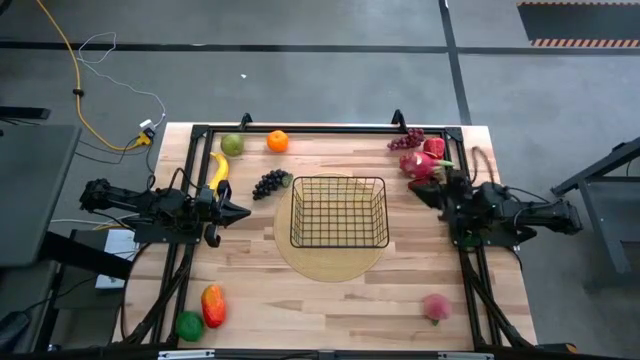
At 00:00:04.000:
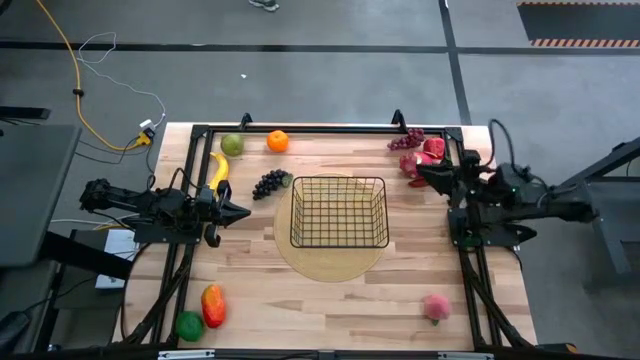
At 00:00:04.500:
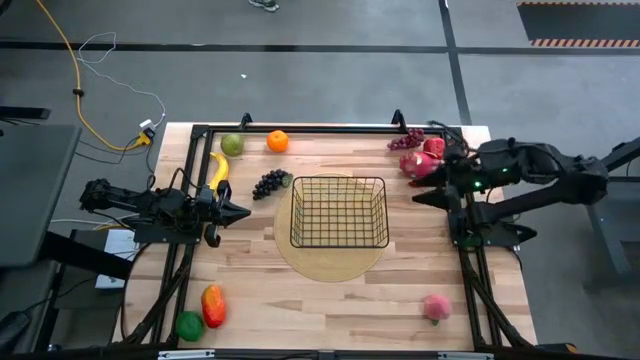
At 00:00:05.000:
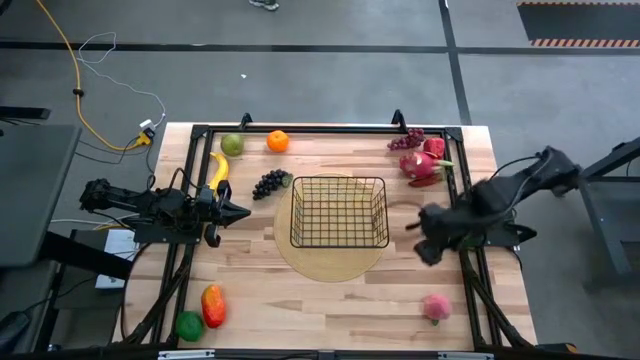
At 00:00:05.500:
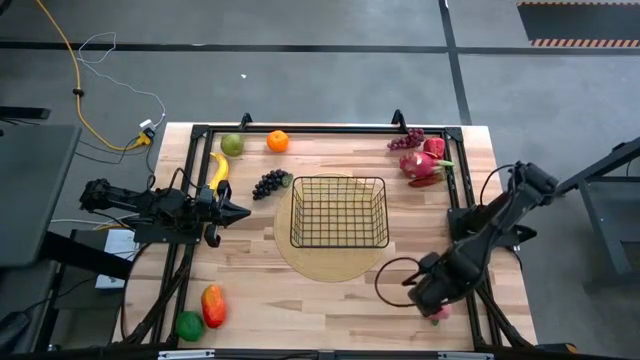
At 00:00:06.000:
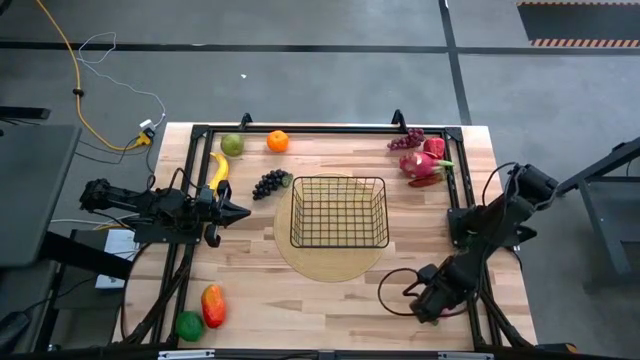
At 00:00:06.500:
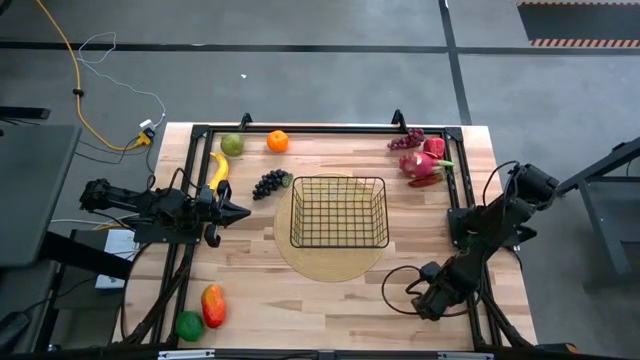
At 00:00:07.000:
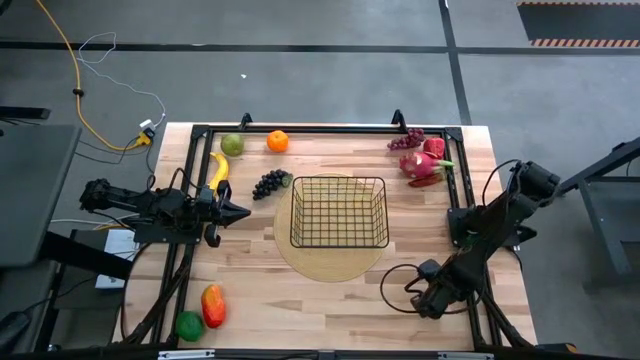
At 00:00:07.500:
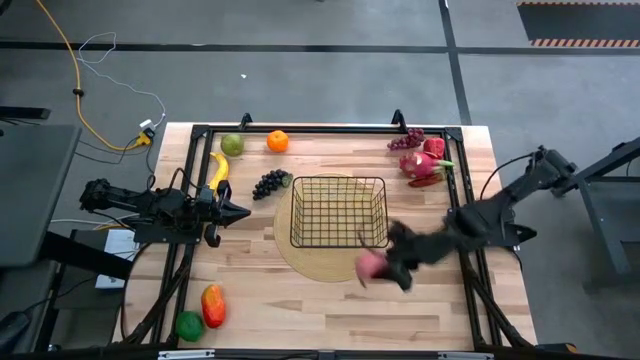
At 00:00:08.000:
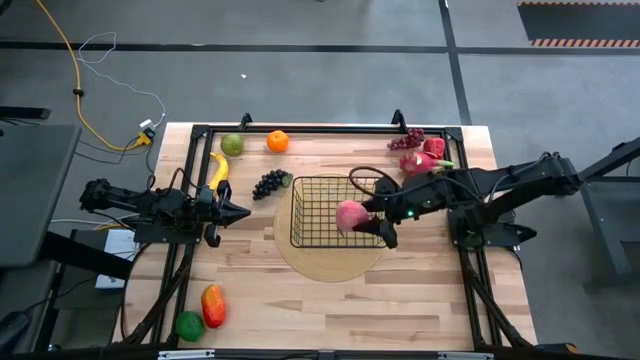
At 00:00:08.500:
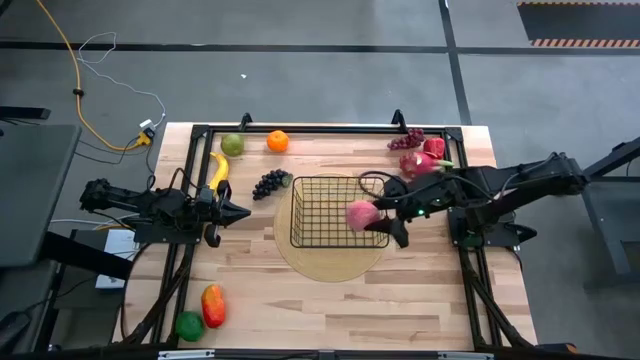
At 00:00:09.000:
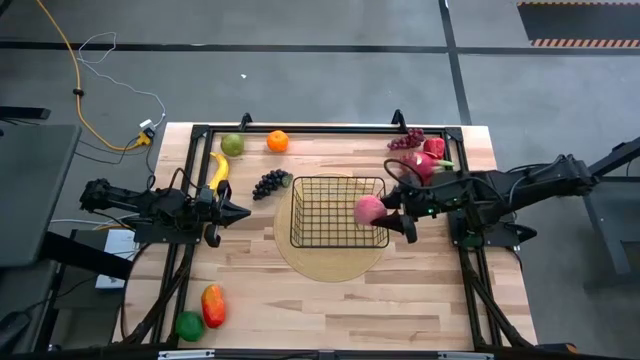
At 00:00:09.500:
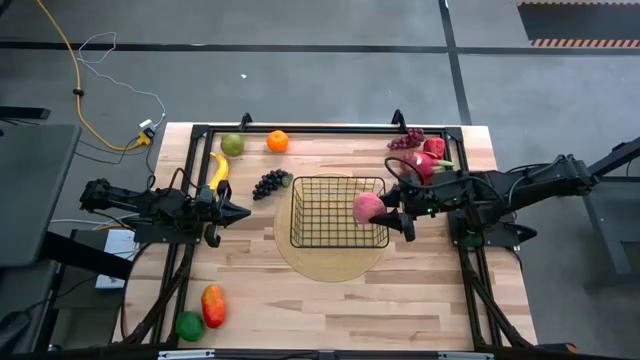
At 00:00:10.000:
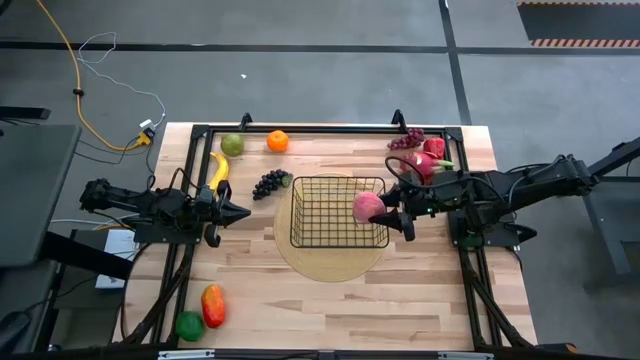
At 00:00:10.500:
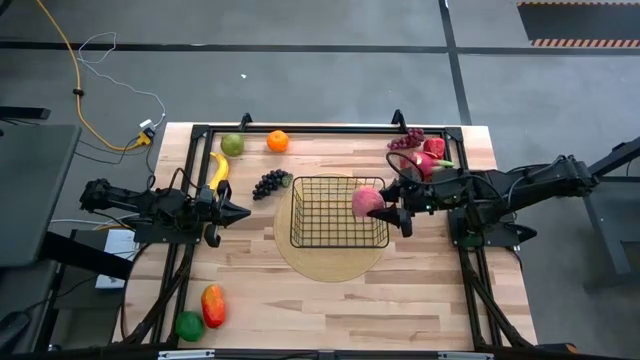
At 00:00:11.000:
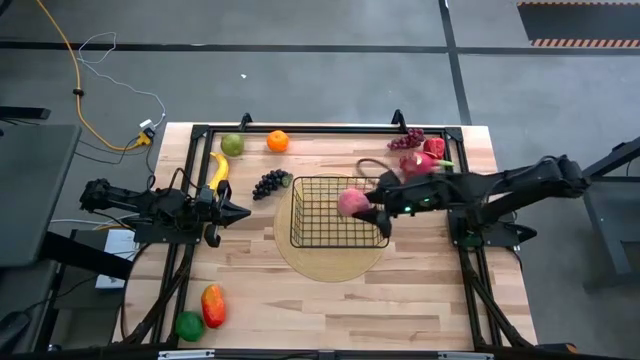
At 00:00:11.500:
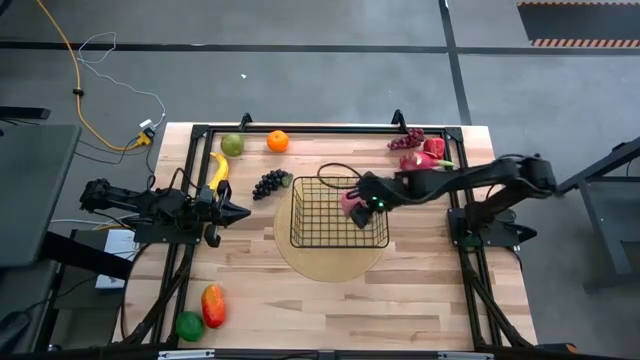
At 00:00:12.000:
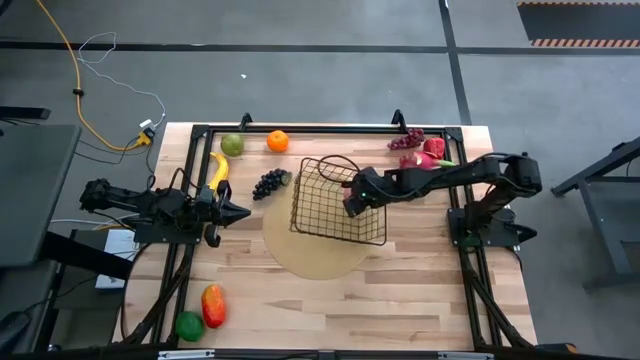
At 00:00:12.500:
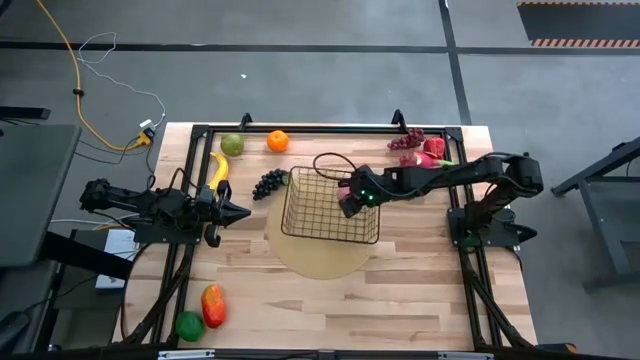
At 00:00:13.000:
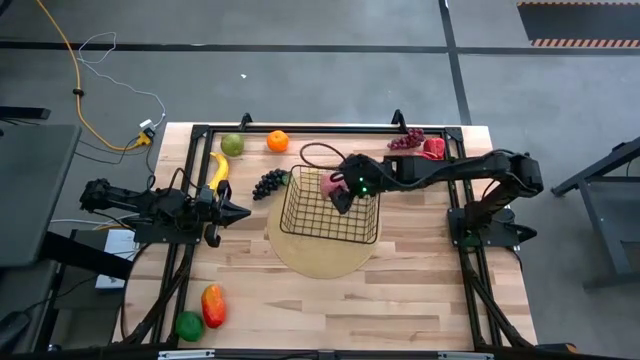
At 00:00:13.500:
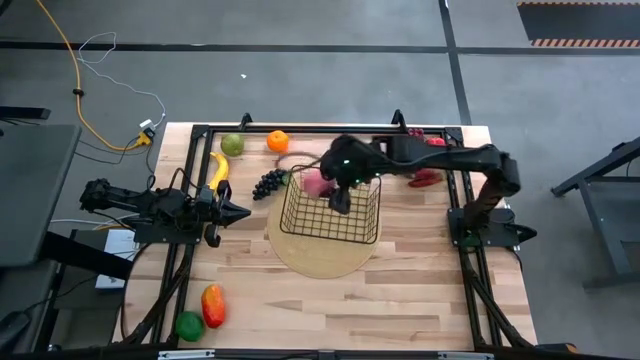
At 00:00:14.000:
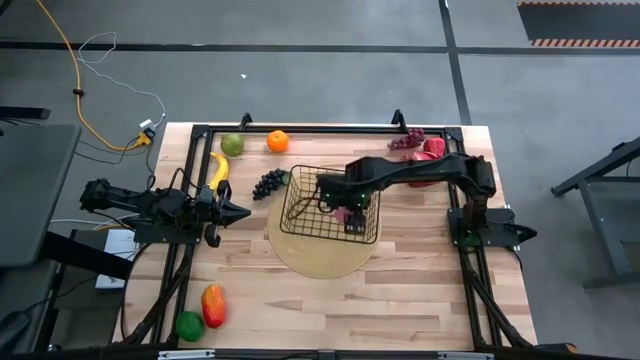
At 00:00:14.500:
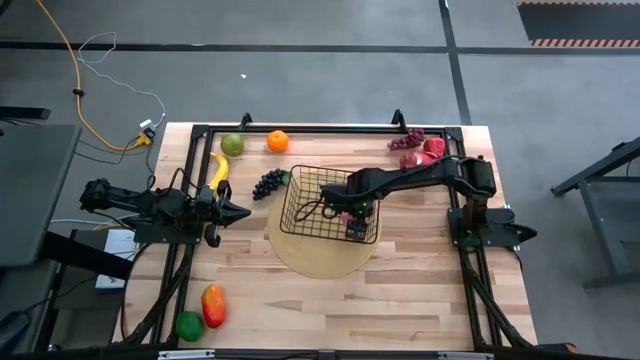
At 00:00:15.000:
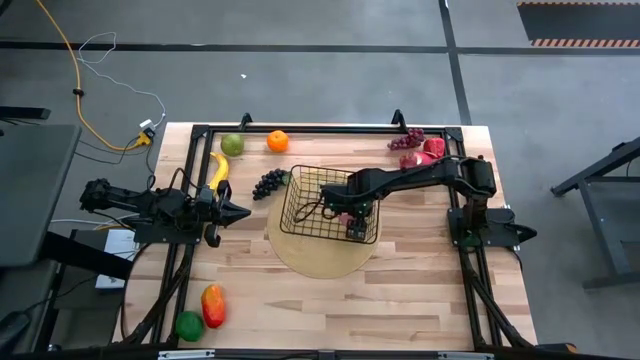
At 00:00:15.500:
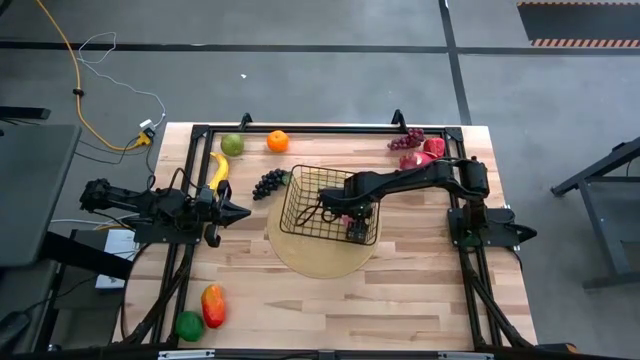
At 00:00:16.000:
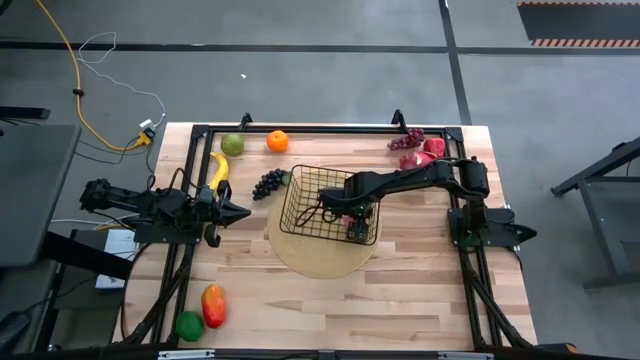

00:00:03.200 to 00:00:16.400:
Task: Build produce basket
Put the peach into the wire basket

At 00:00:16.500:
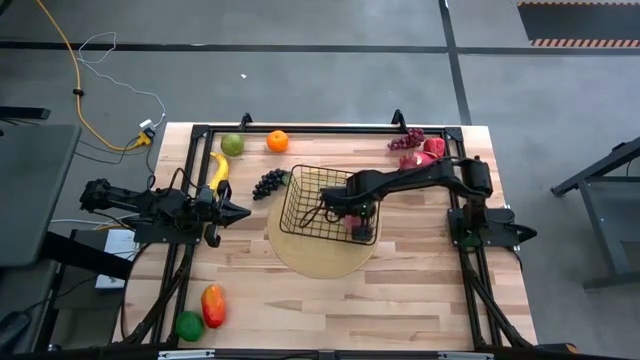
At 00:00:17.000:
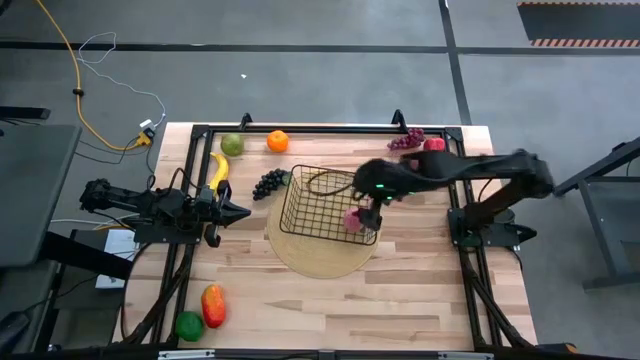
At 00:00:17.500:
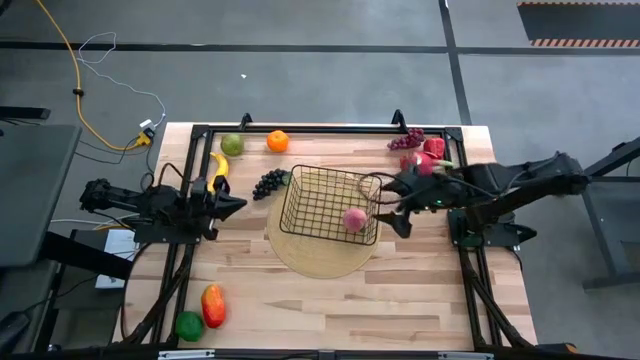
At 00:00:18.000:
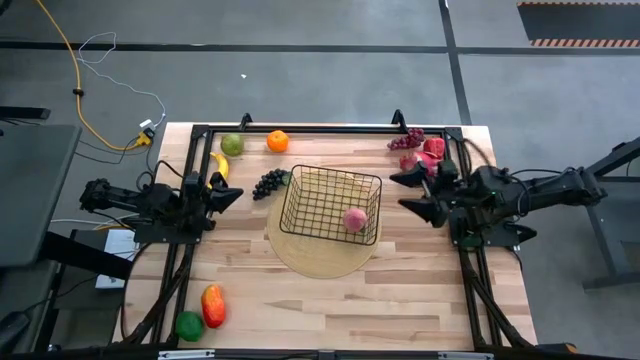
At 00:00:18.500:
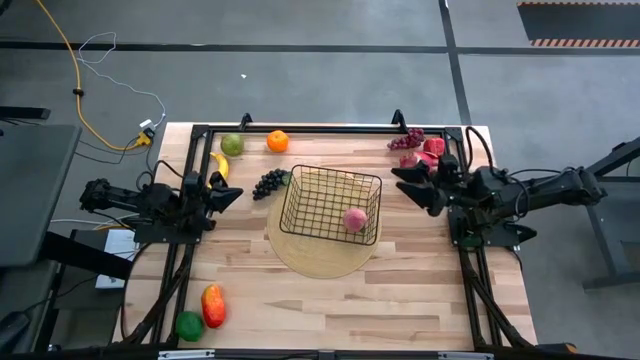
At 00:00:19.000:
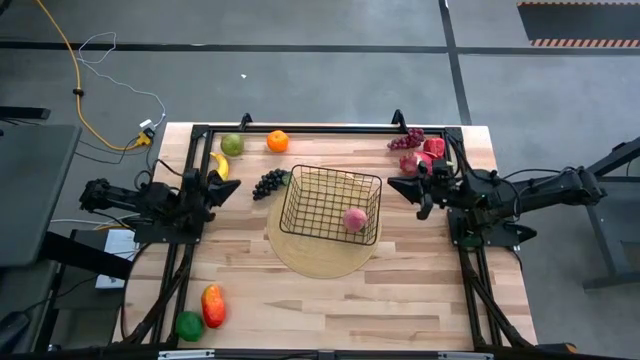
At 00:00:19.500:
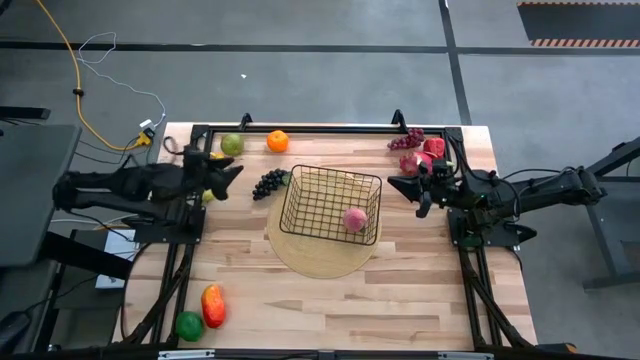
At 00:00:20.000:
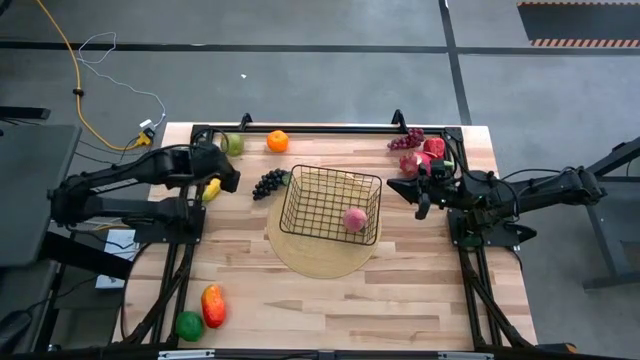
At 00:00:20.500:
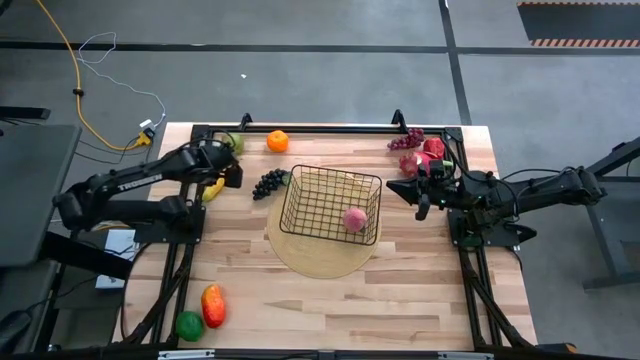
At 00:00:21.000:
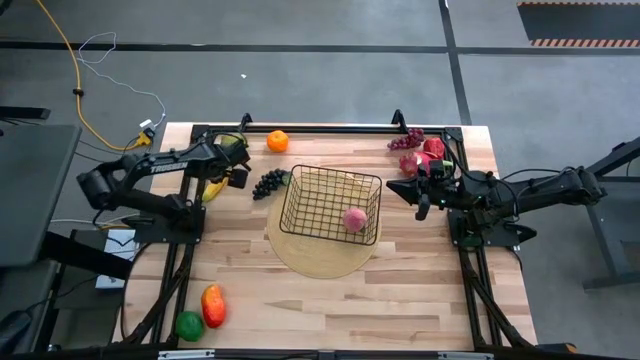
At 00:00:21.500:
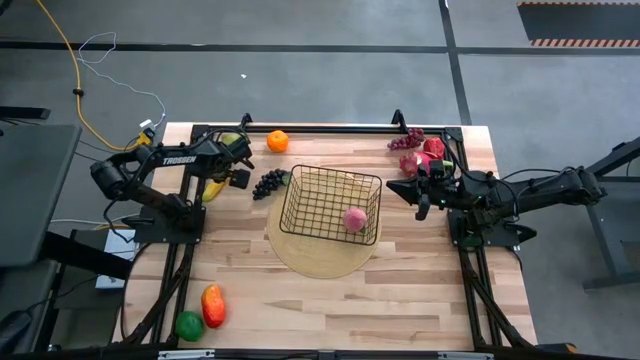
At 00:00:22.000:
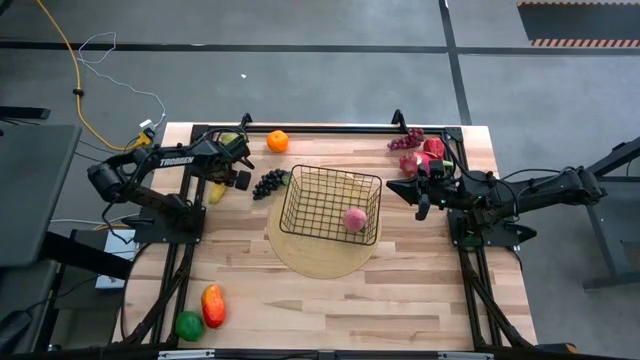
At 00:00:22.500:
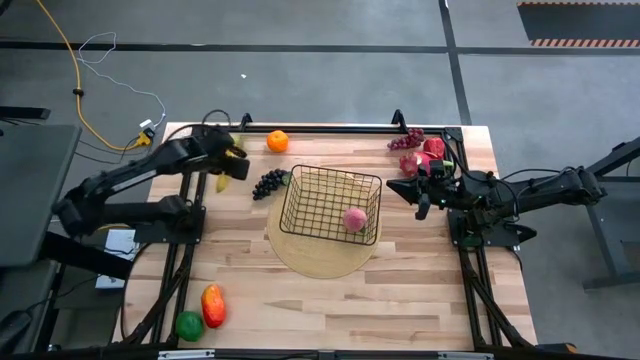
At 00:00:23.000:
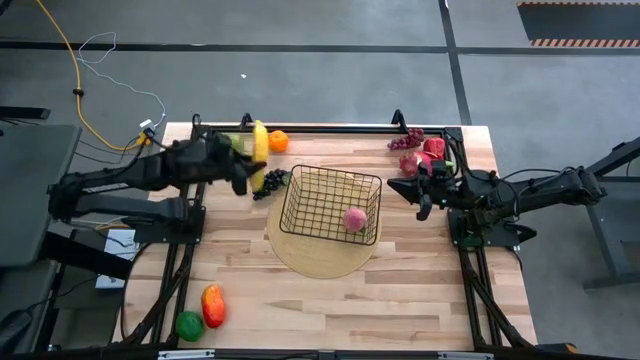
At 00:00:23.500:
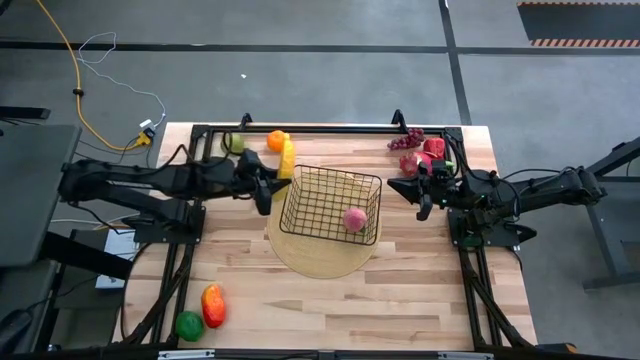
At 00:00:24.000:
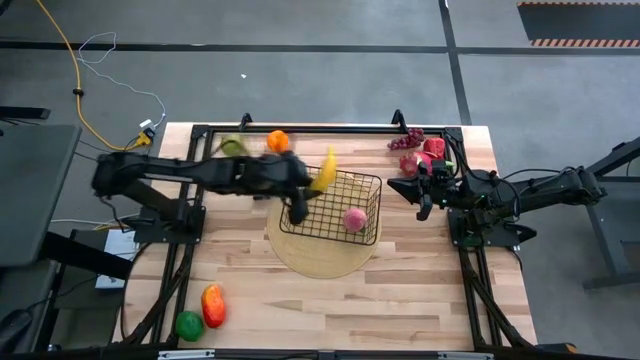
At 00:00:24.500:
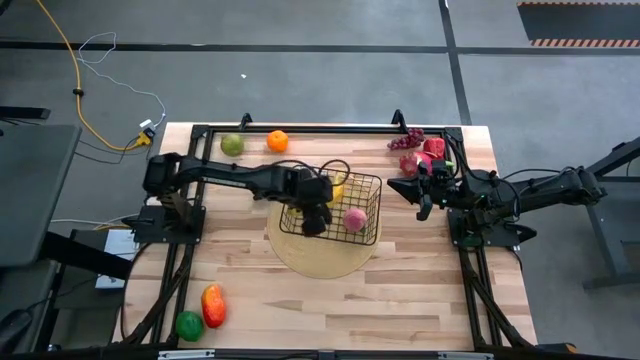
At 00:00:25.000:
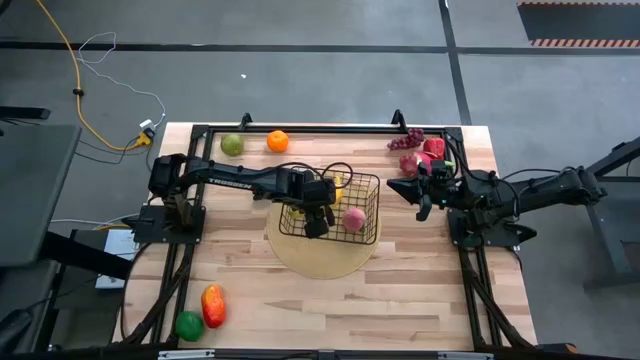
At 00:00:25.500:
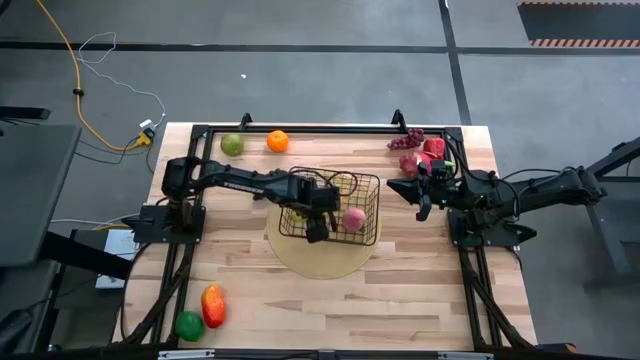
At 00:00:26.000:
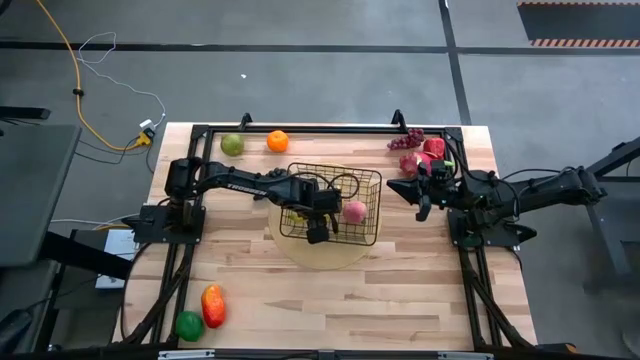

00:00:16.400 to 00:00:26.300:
Put the banana into the wire basket
